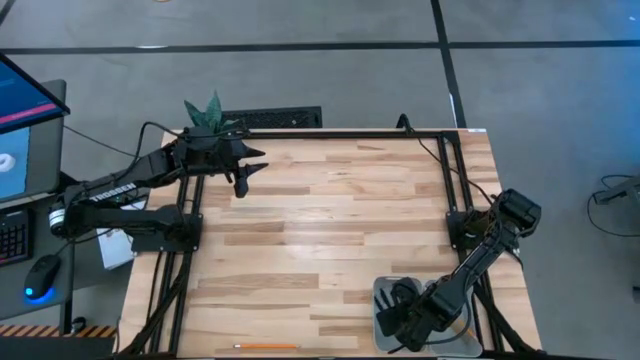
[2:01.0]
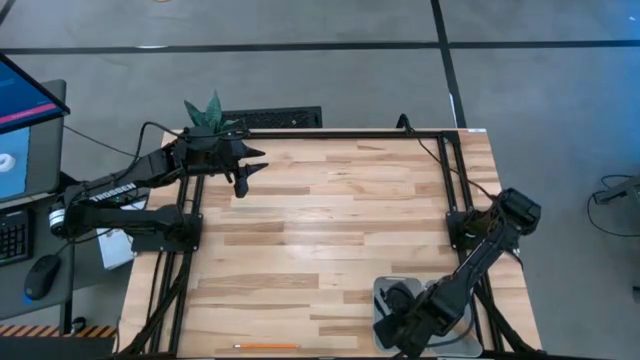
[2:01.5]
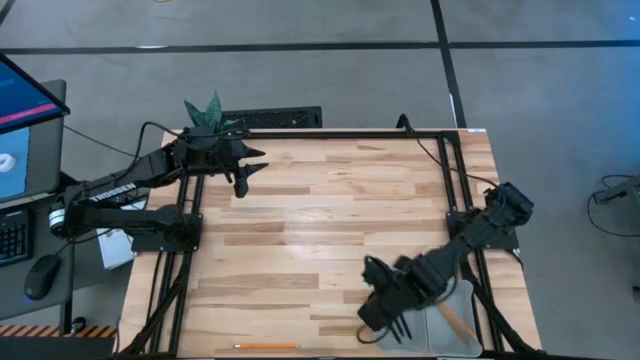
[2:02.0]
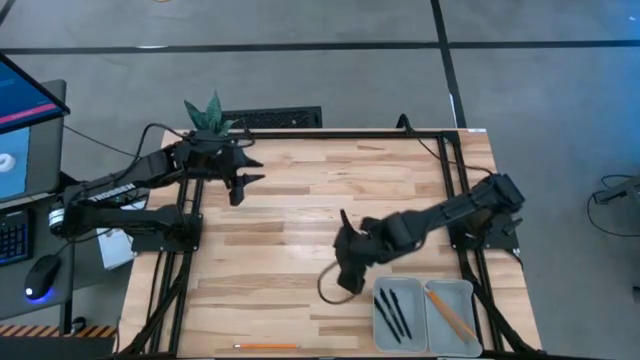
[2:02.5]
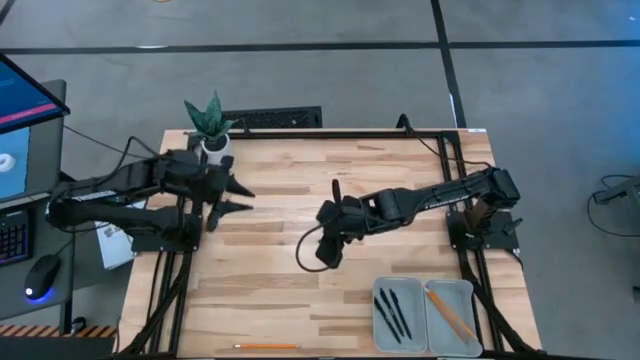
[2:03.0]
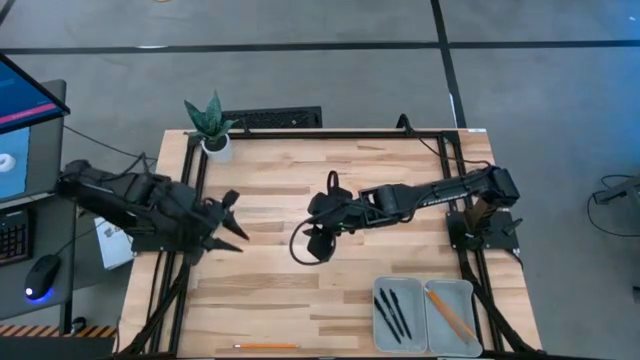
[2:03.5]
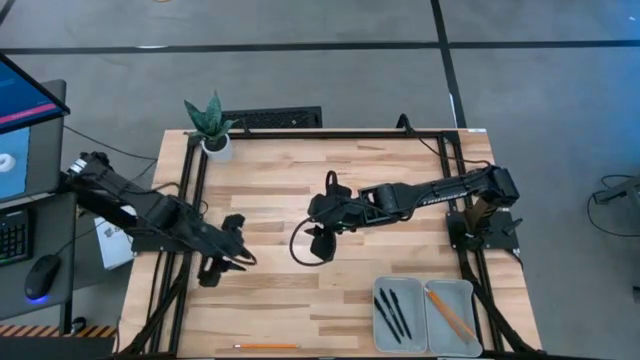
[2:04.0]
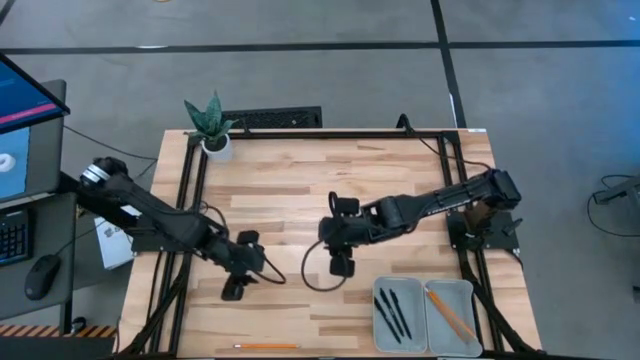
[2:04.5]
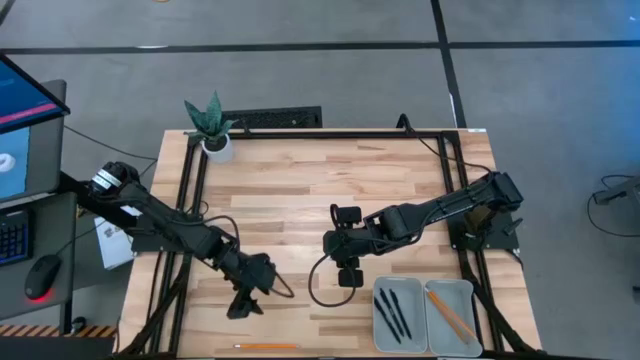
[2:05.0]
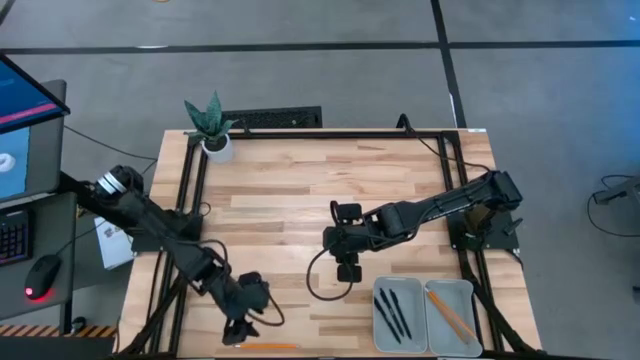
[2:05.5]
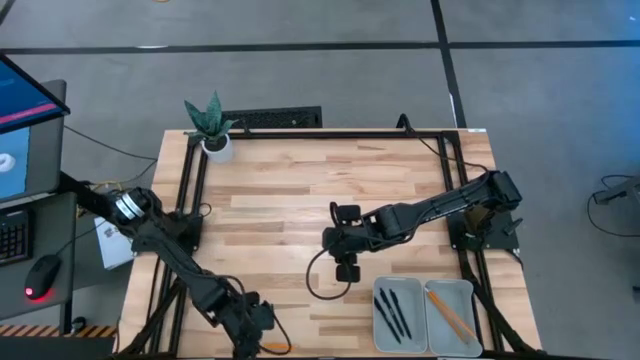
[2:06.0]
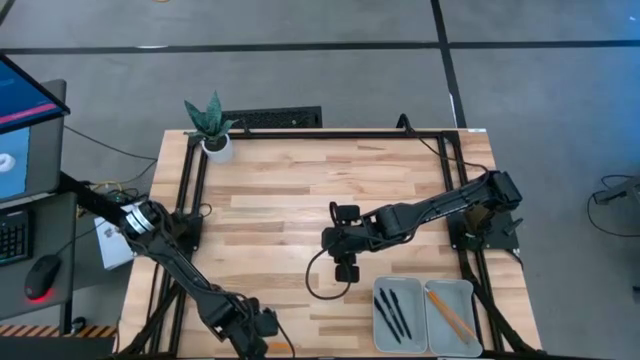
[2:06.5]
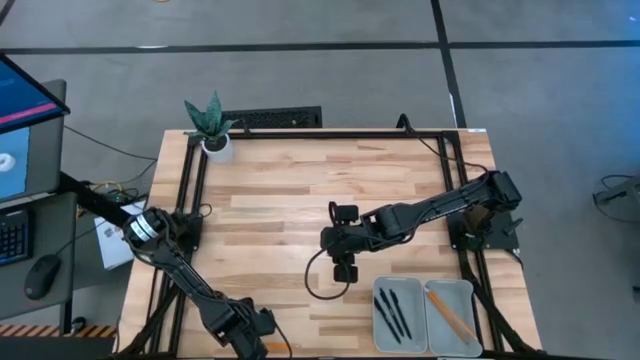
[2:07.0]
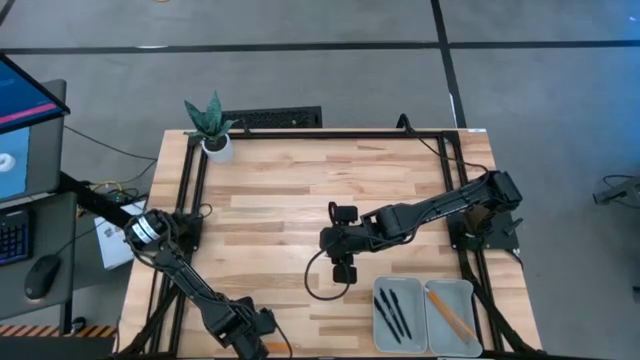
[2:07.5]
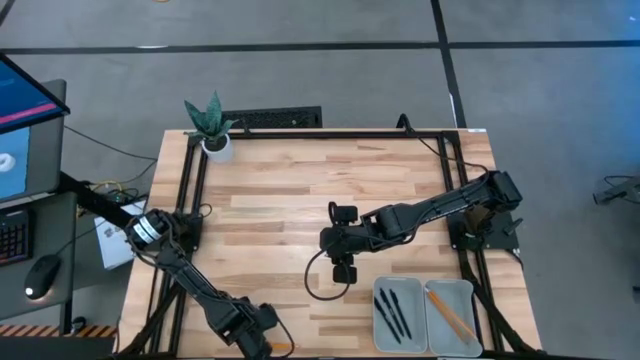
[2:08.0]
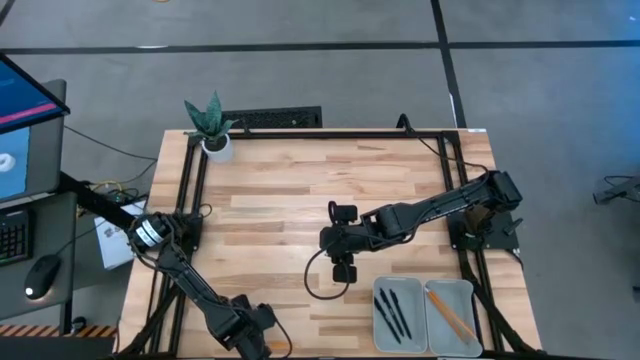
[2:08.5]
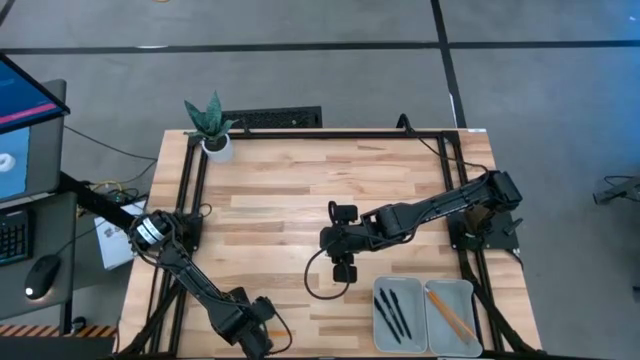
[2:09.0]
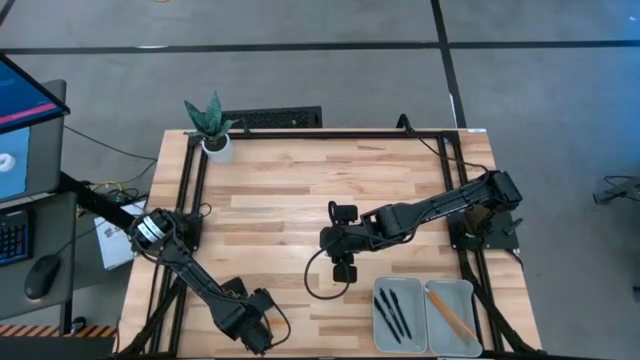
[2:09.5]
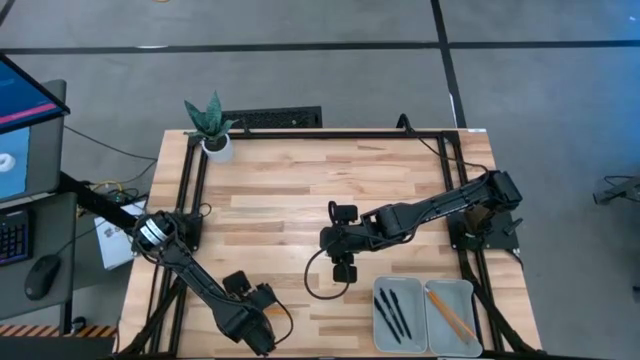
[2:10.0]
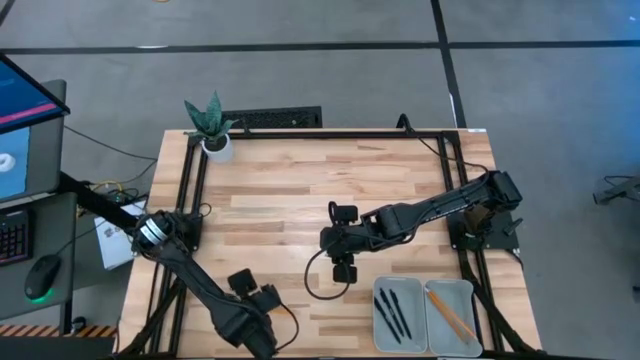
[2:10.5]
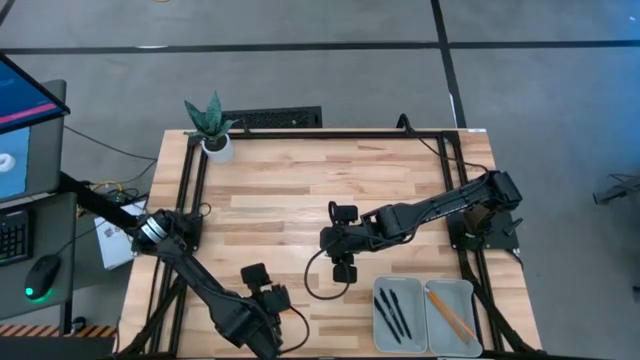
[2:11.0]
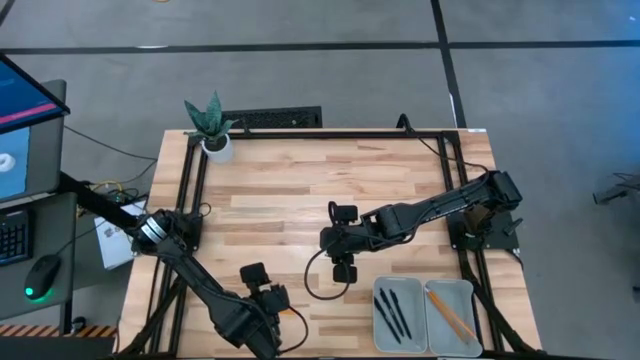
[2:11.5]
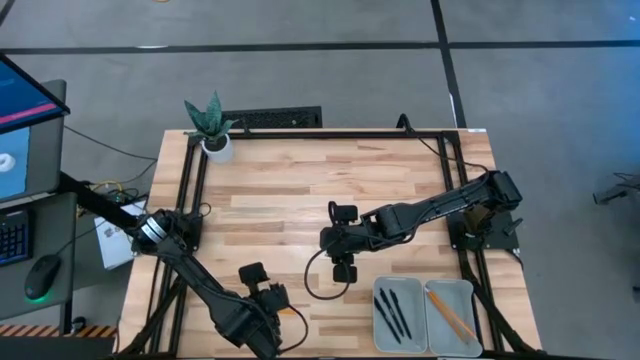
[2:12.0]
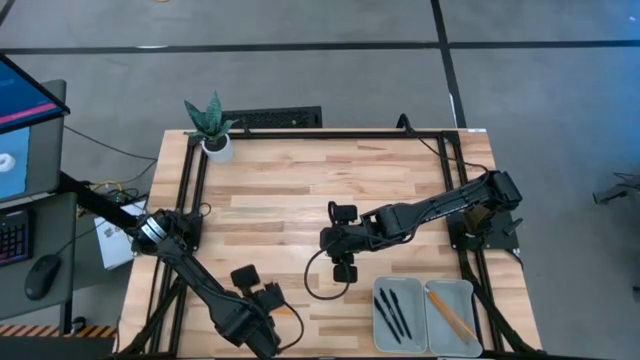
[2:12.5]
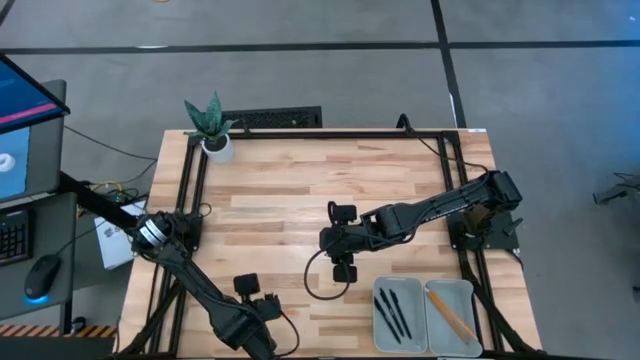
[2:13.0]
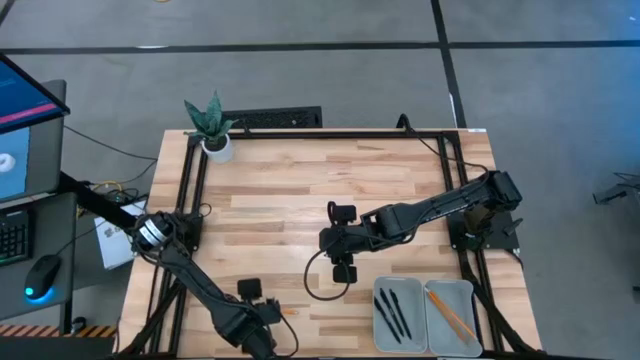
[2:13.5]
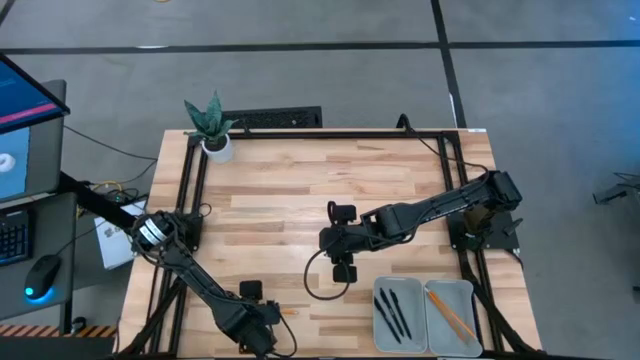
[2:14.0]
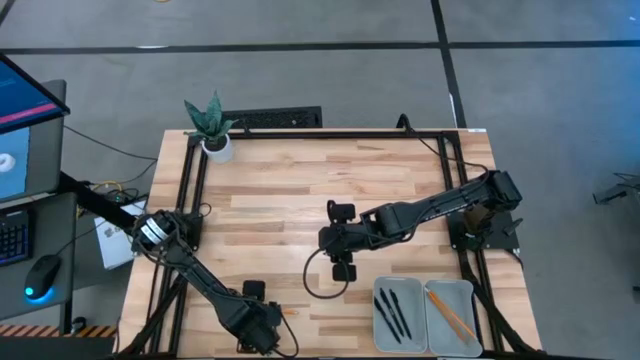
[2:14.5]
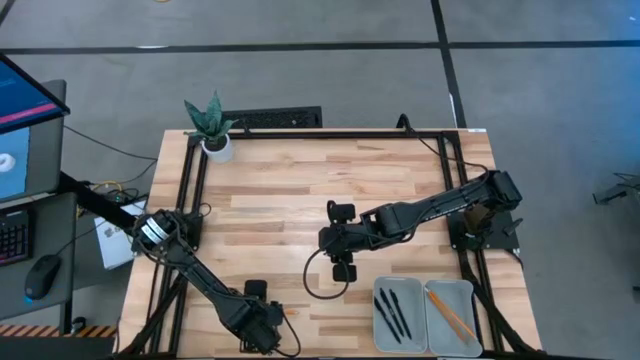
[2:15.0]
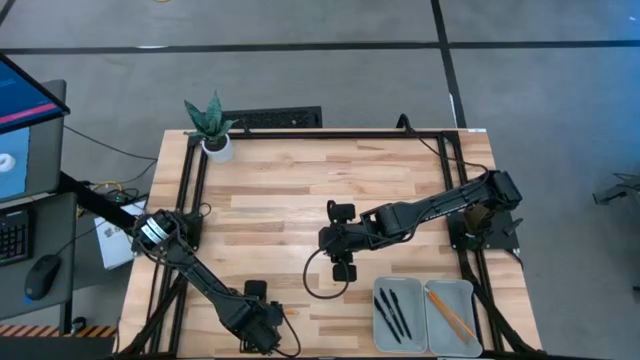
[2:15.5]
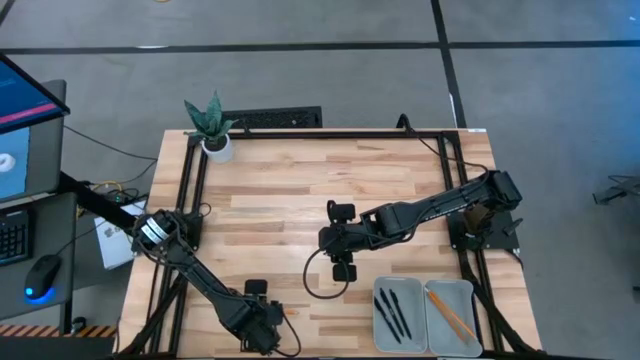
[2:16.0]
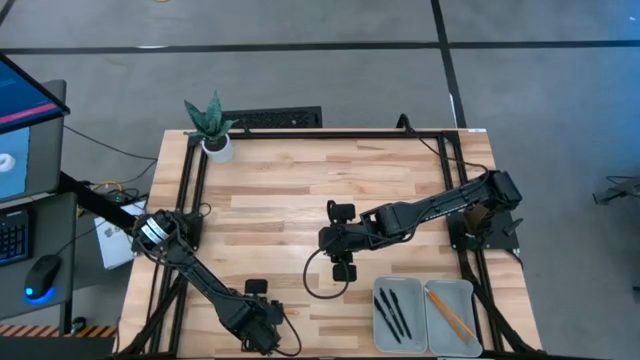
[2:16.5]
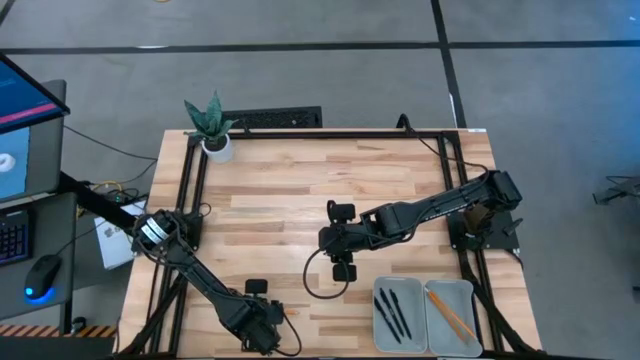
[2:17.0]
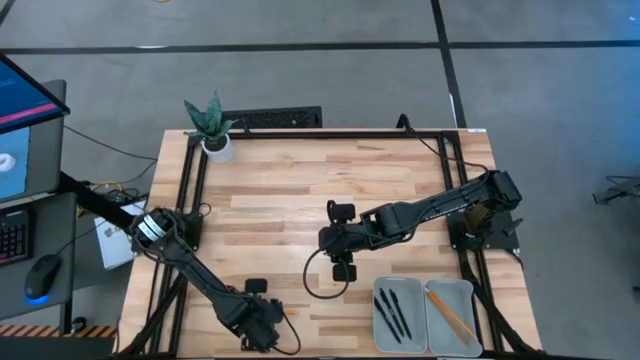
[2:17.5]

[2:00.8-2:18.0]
Task: Sort pens & pencils
Put the orange pencil into the bottom right gray bin

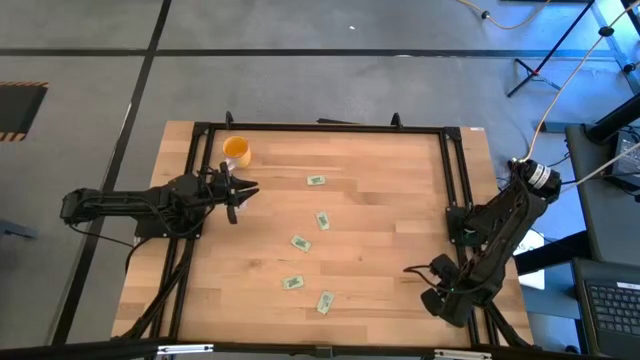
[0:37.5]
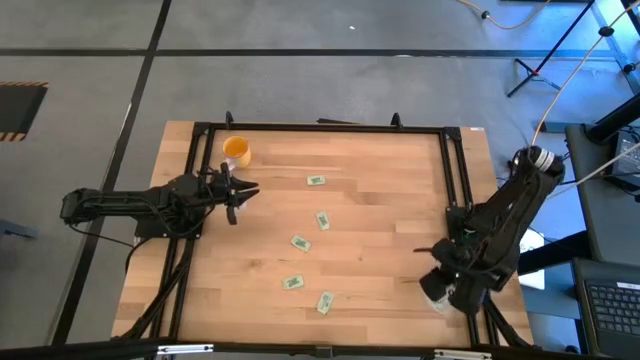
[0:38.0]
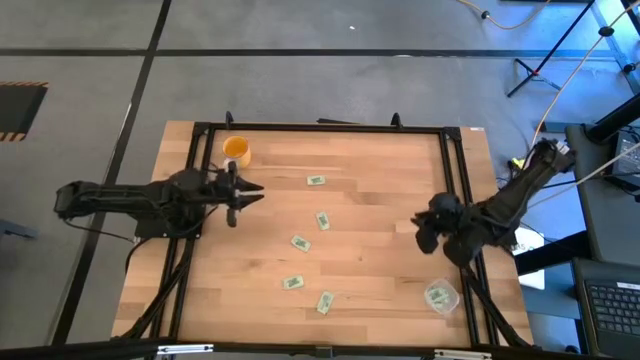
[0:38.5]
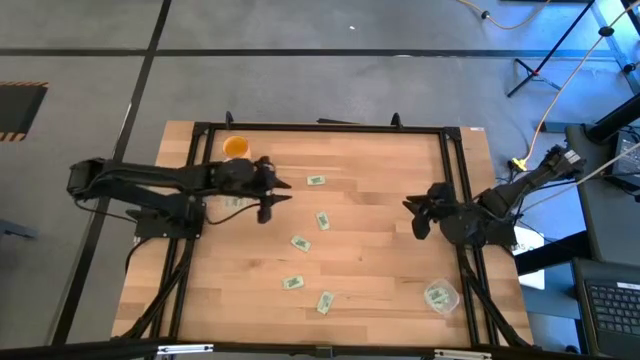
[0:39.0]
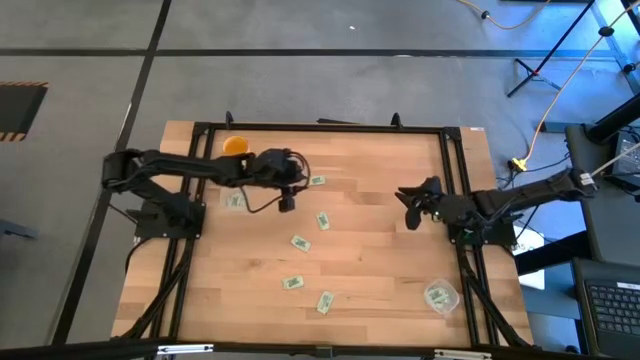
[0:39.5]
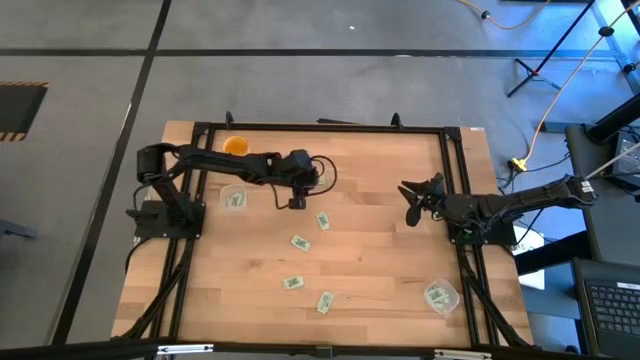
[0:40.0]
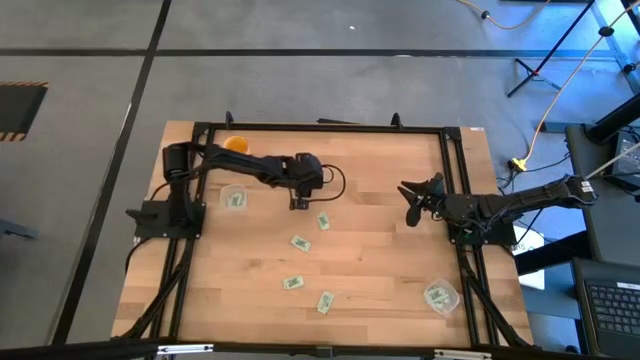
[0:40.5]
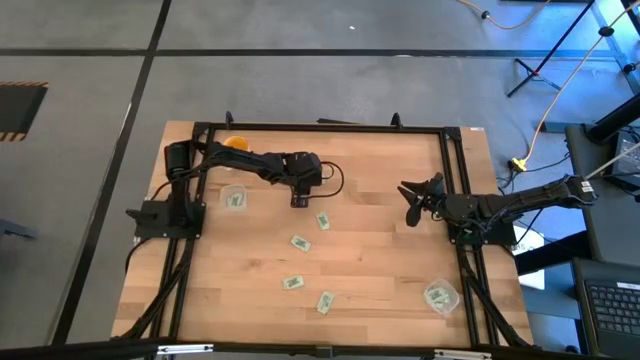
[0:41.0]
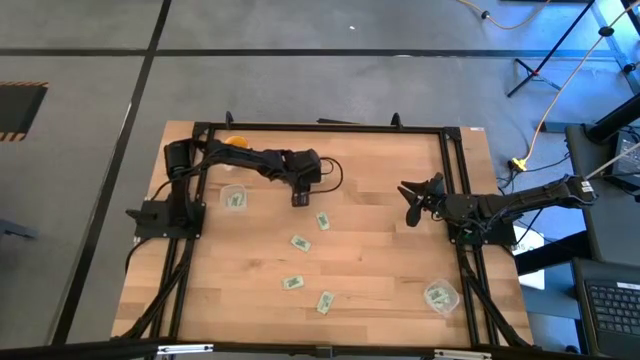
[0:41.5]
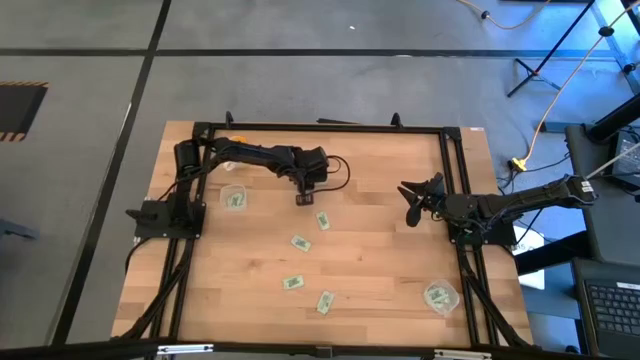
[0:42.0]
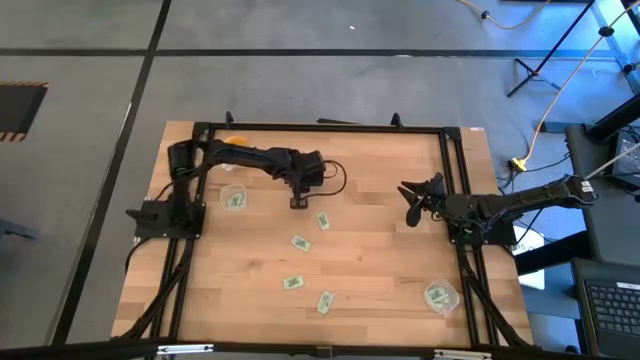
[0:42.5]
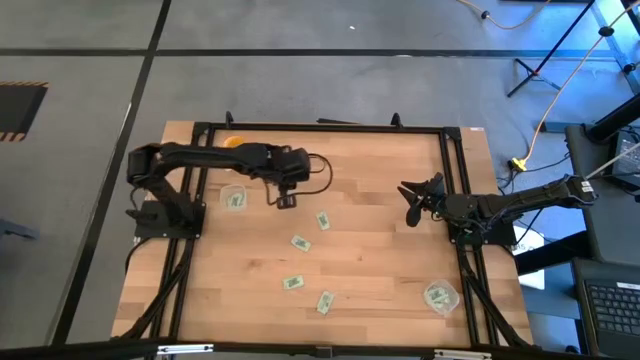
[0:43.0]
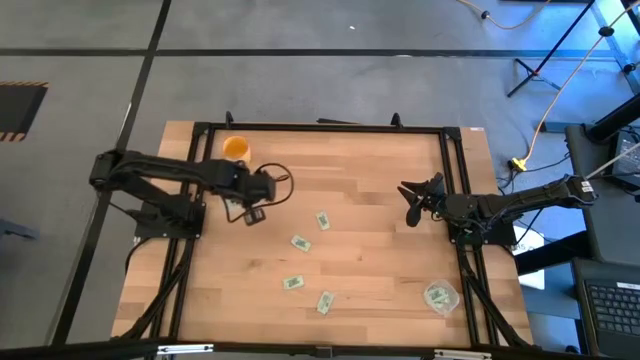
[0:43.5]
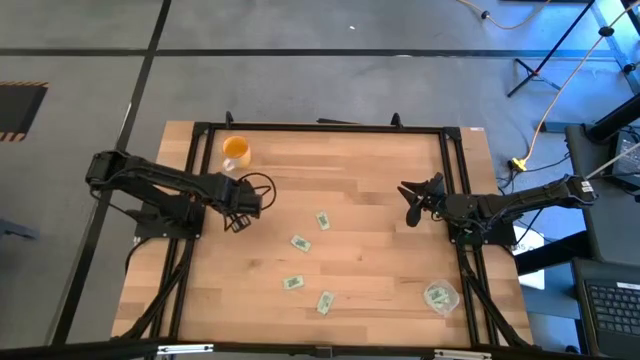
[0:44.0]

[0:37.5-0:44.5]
Task: Pick and place items into bin
Put the green stevia packet into the top transparent bin
